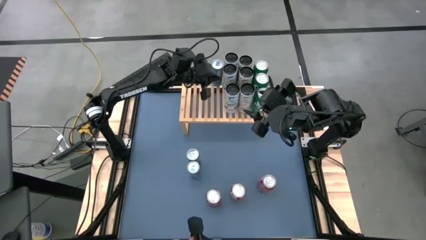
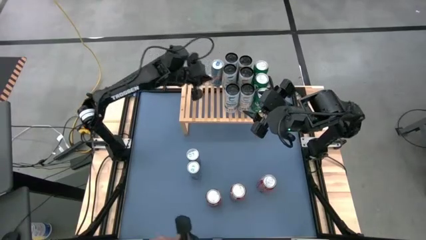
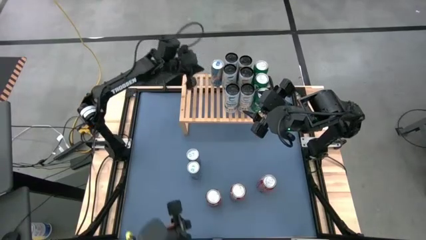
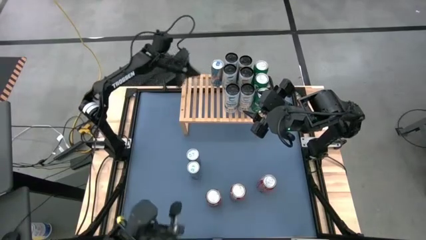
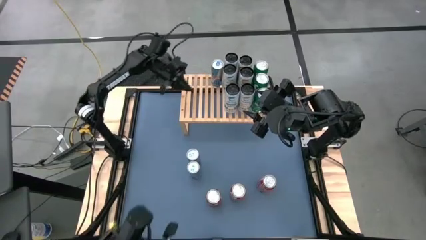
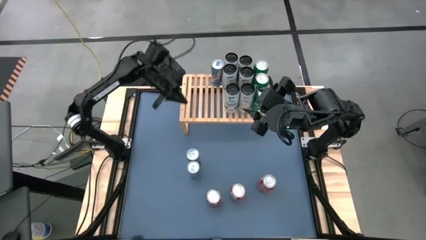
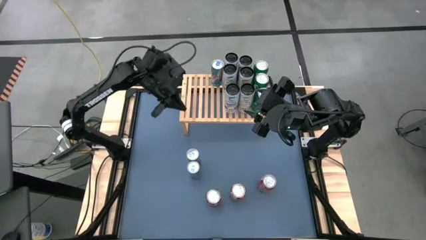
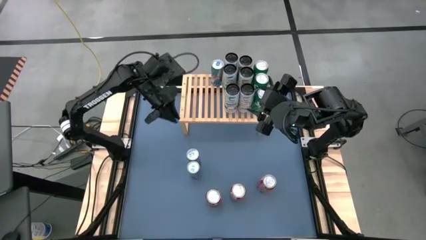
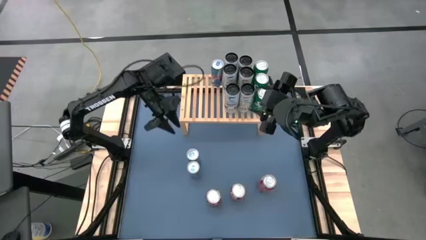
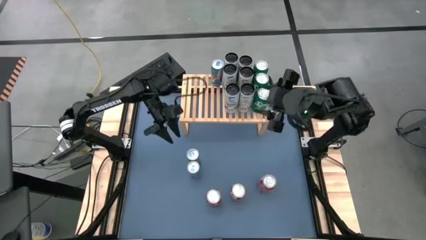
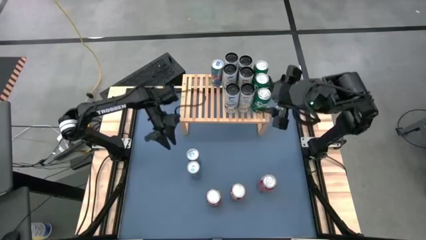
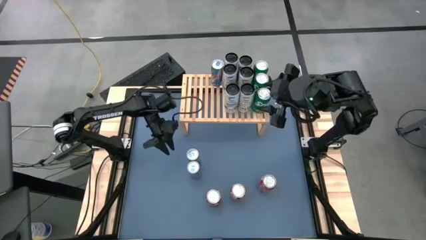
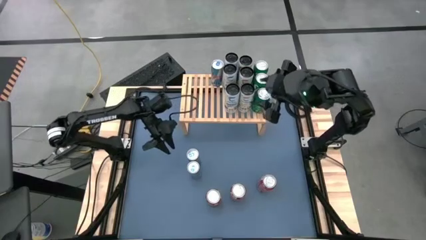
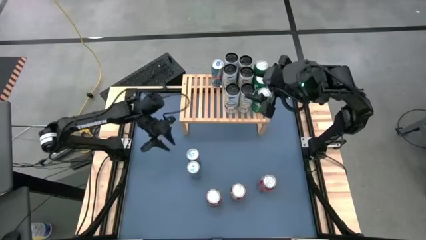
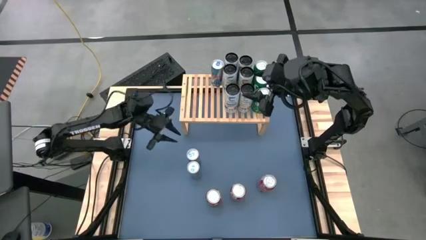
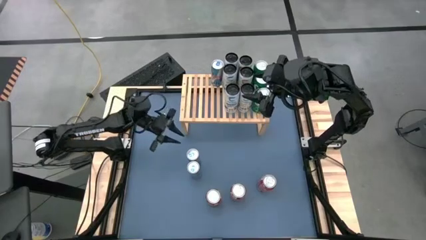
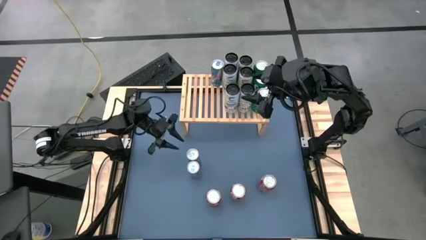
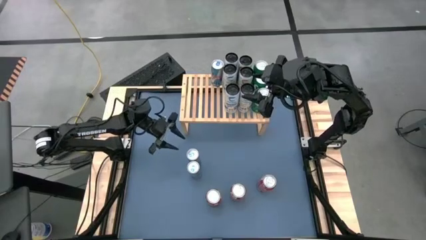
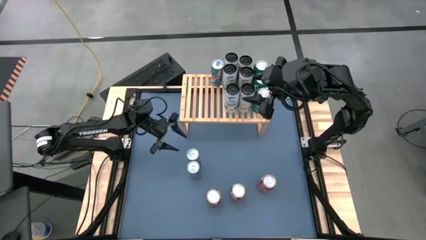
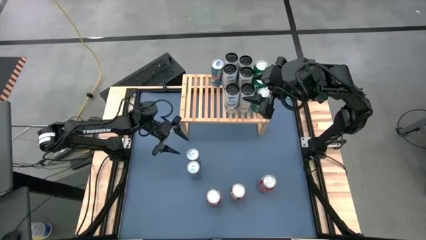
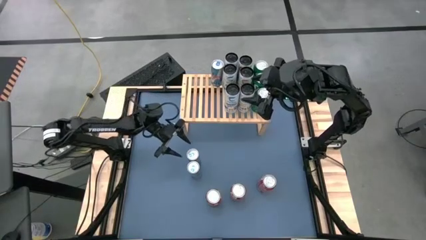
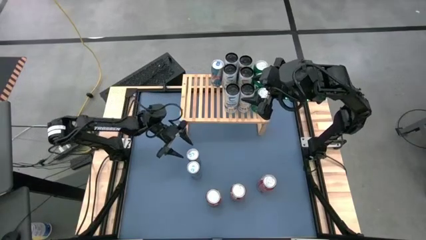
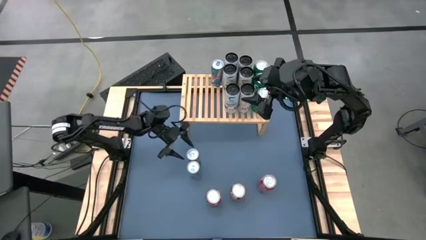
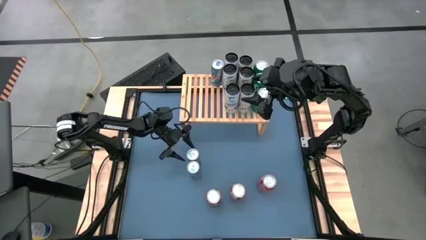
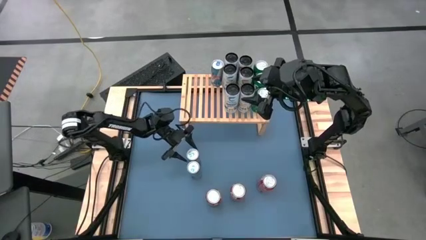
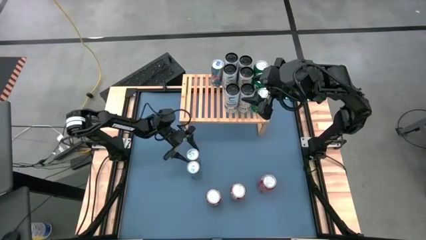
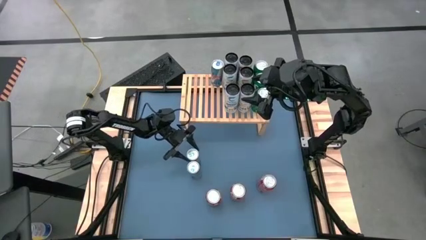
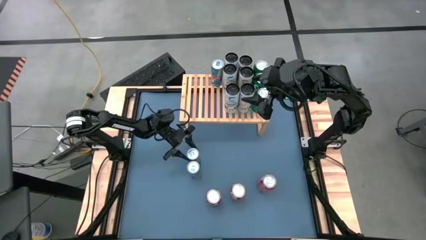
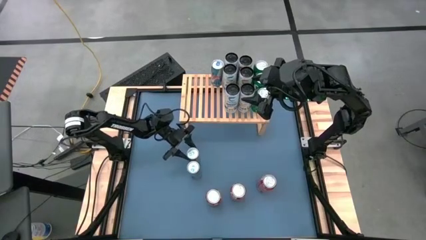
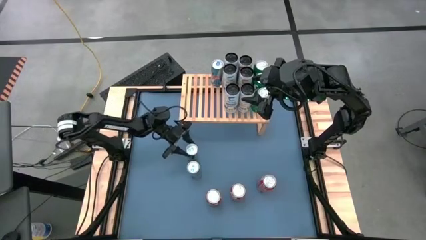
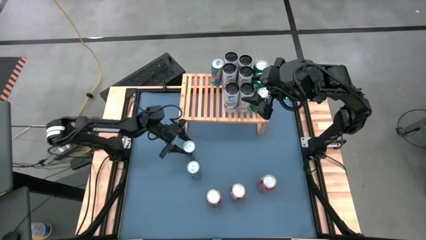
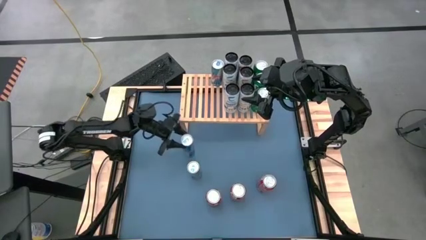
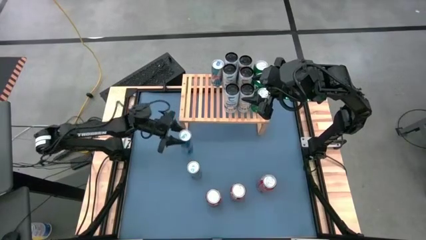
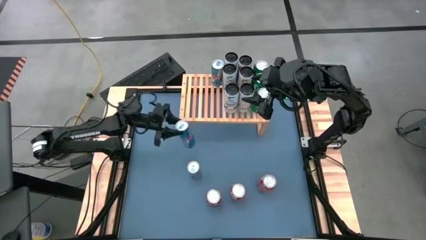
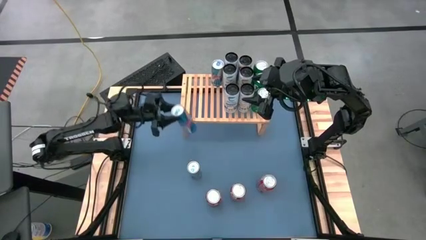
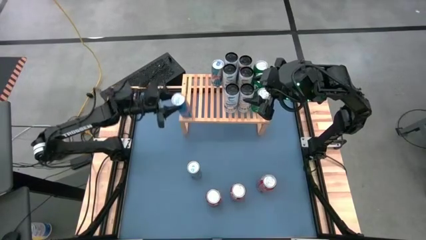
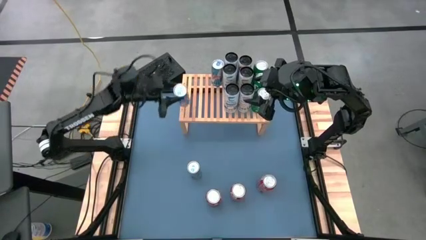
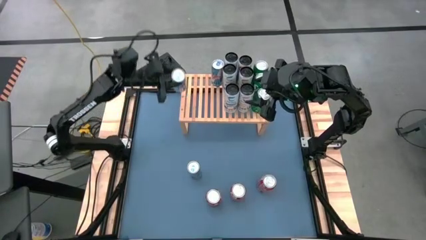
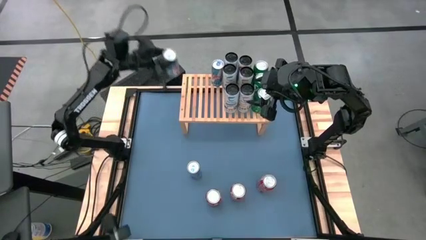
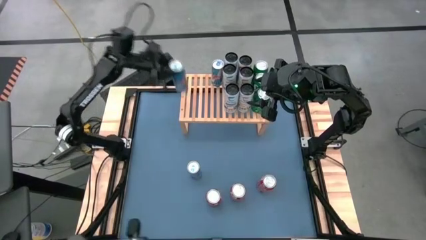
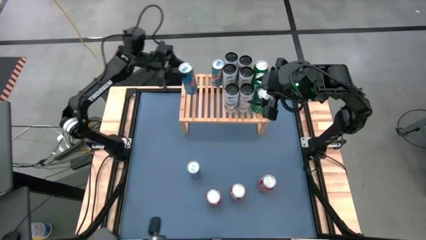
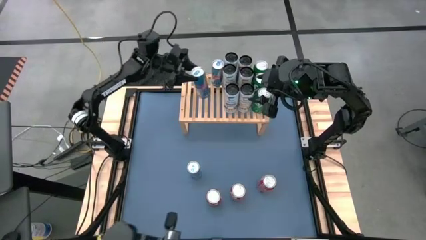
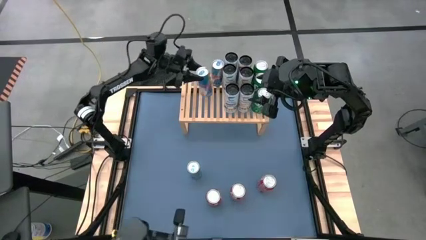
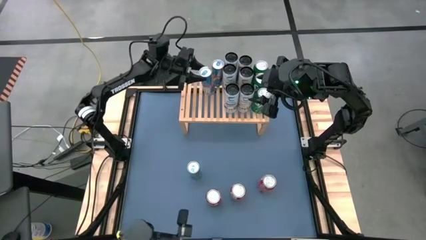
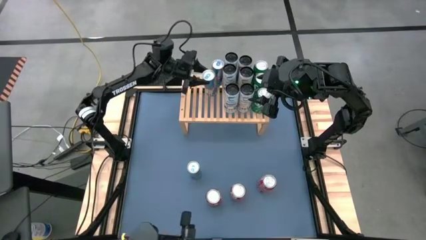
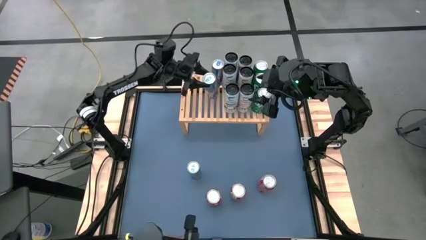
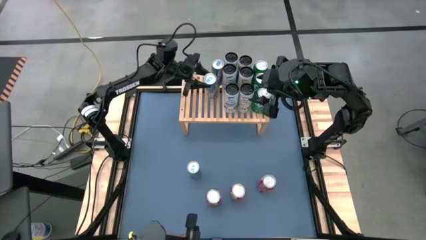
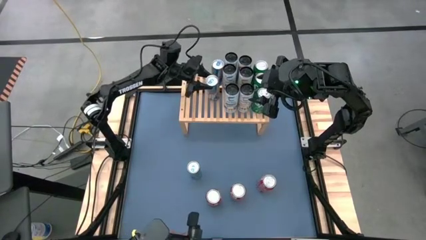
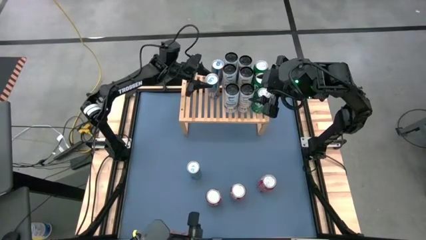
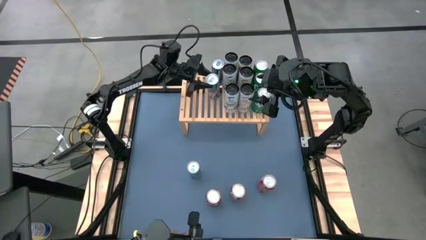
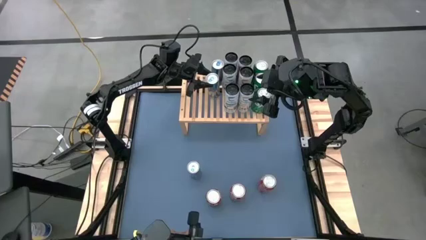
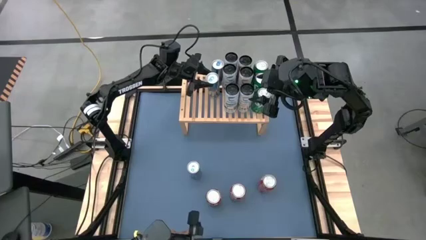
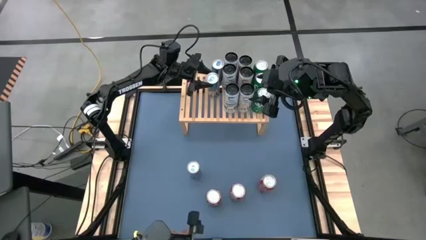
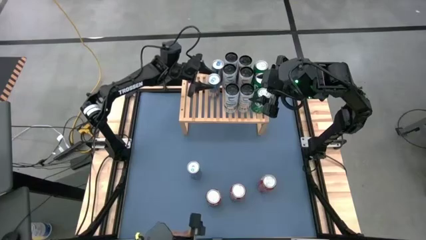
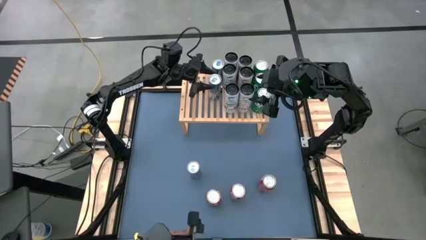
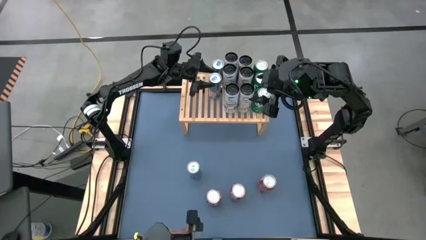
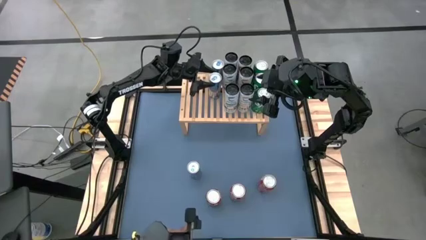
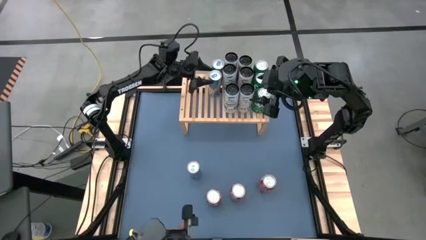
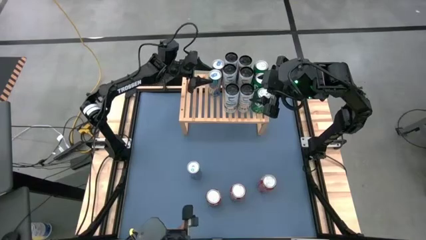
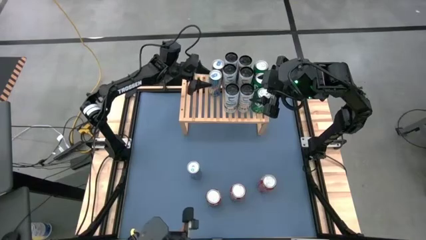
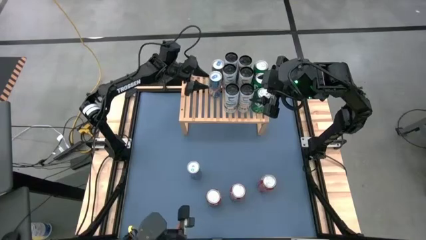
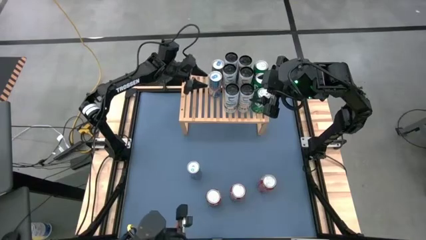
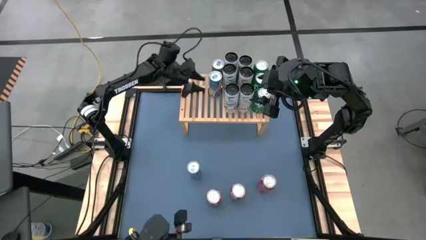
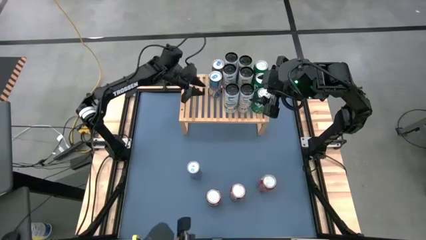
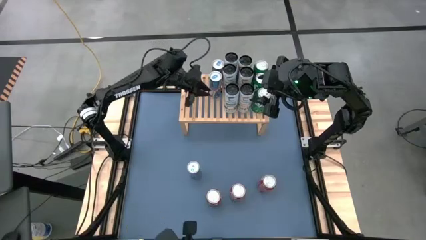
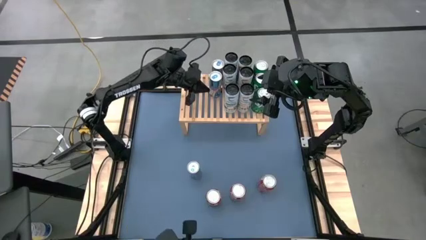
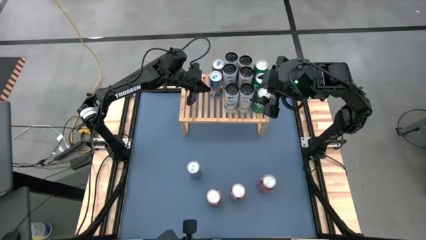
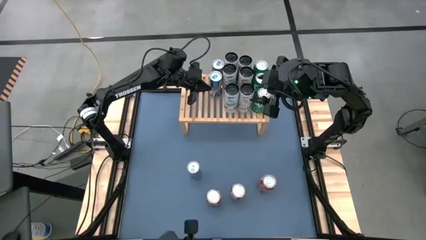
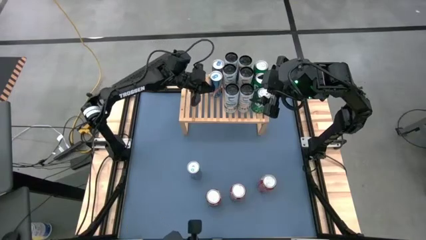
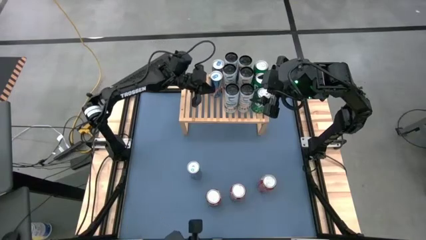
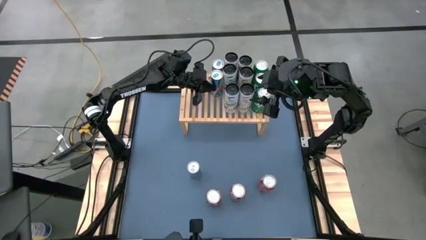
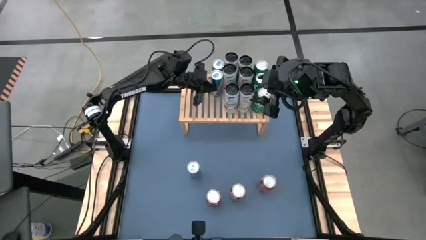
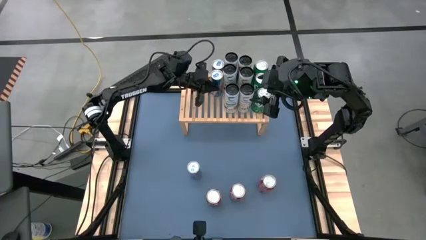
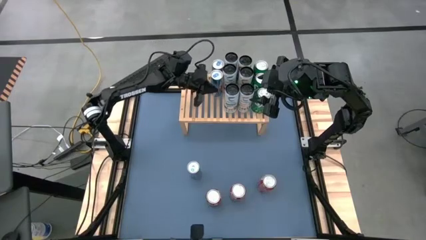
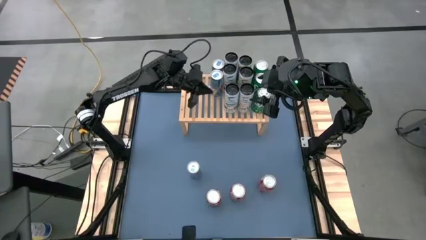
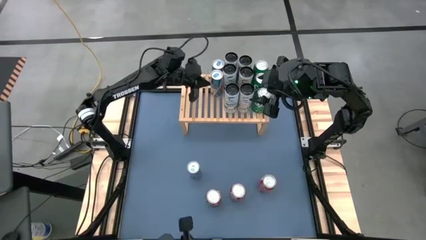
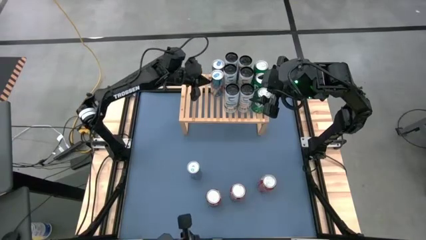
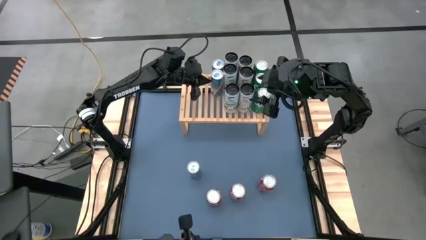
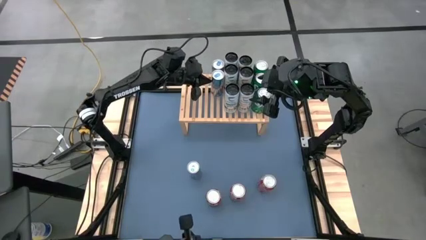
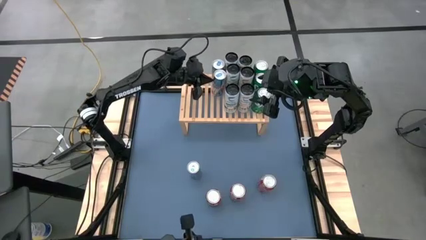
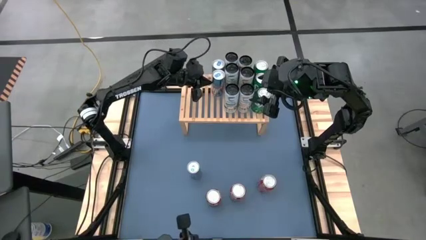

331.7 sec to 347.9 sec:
Task: Place canned beverage on shelf
Put the top blue soda can on the shelf aligned with the other blue soda can
